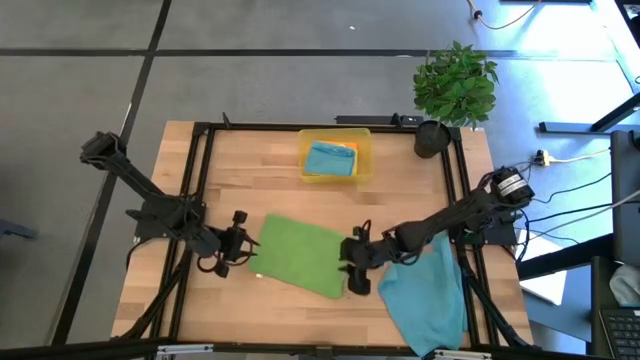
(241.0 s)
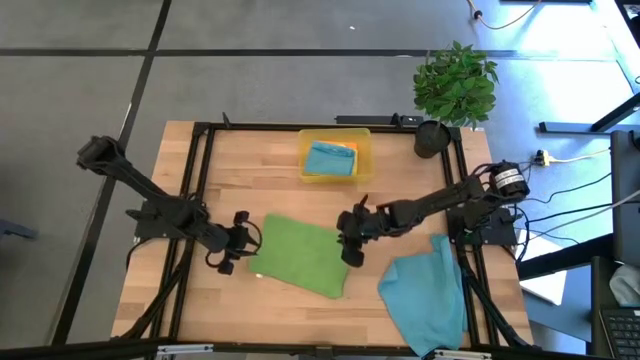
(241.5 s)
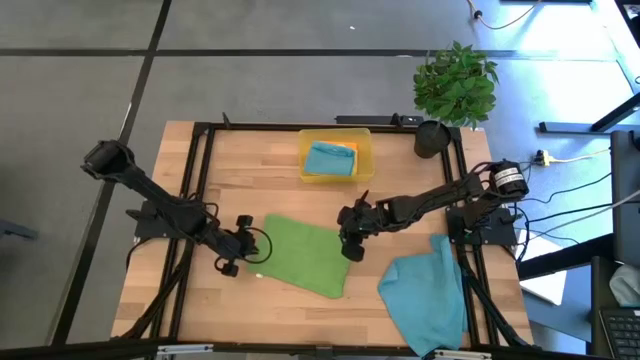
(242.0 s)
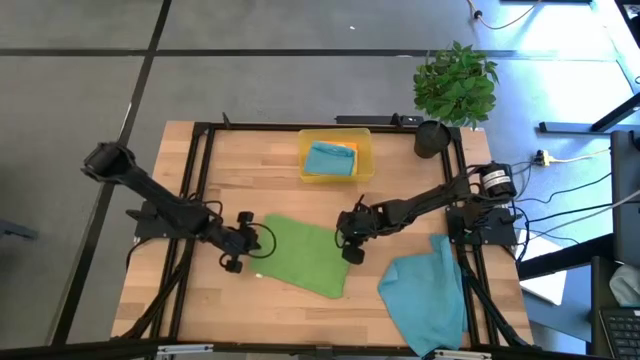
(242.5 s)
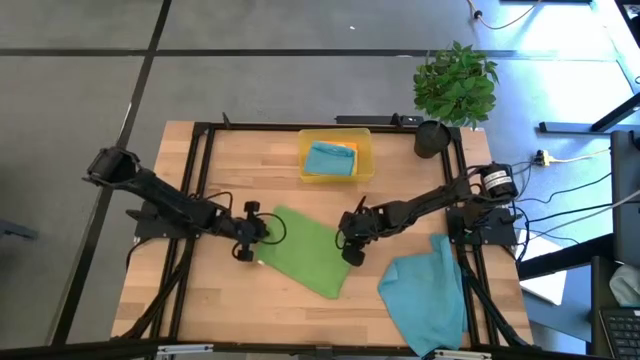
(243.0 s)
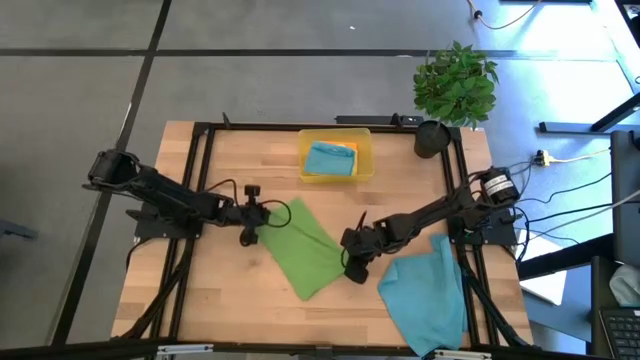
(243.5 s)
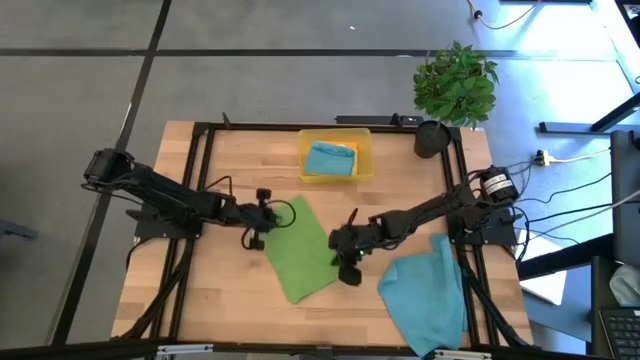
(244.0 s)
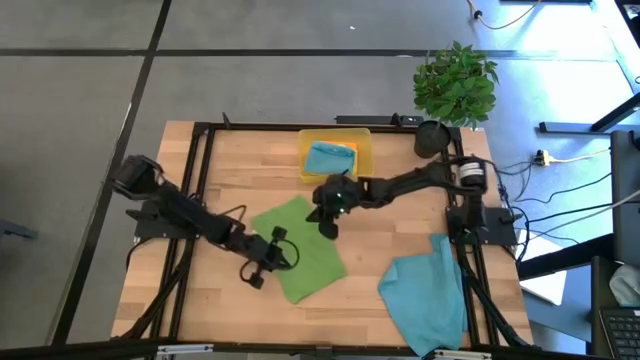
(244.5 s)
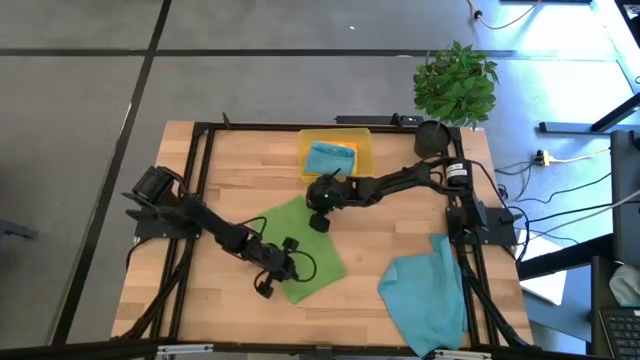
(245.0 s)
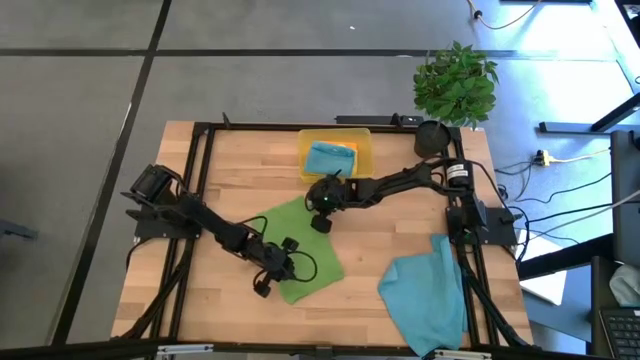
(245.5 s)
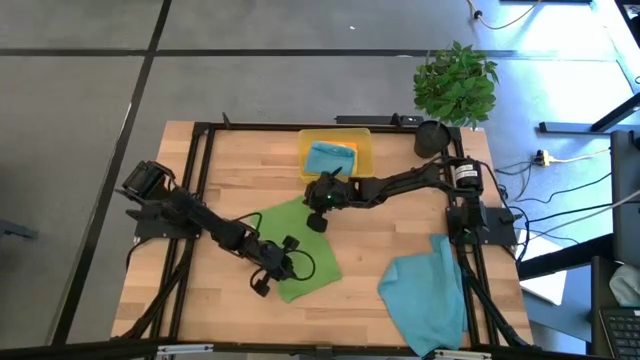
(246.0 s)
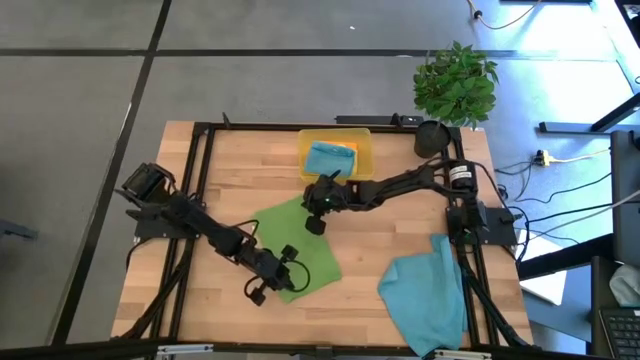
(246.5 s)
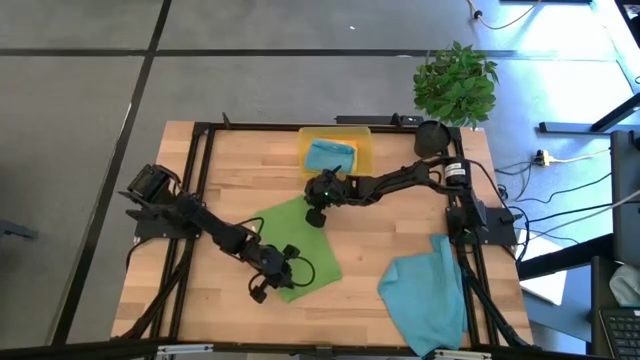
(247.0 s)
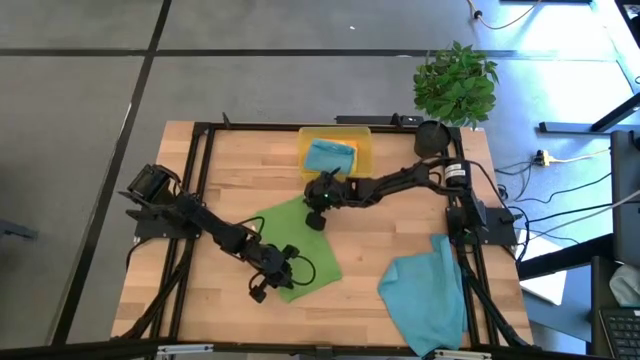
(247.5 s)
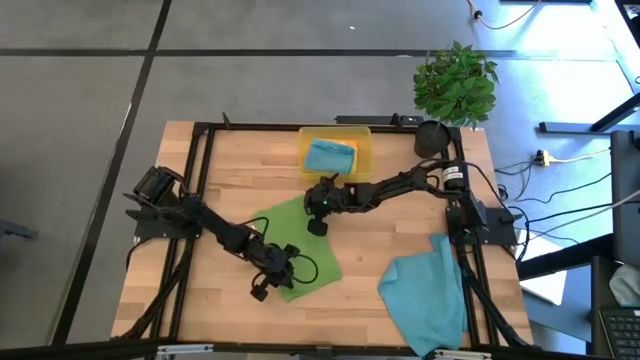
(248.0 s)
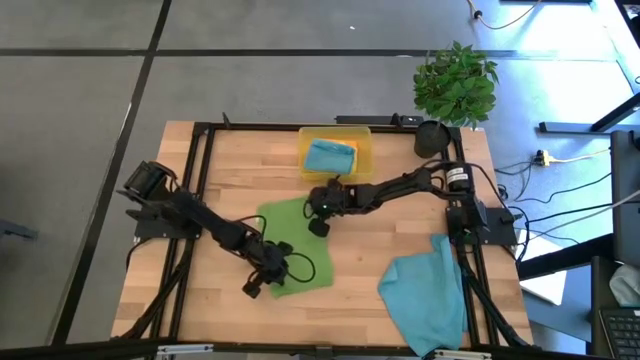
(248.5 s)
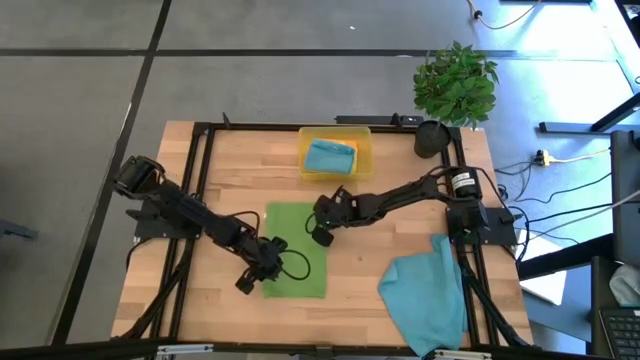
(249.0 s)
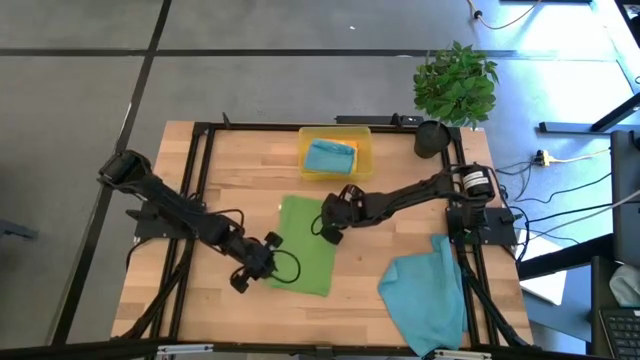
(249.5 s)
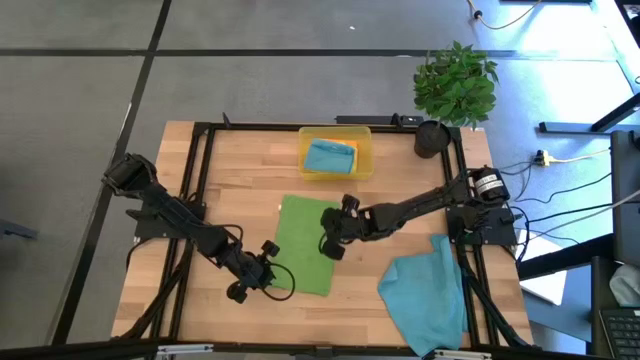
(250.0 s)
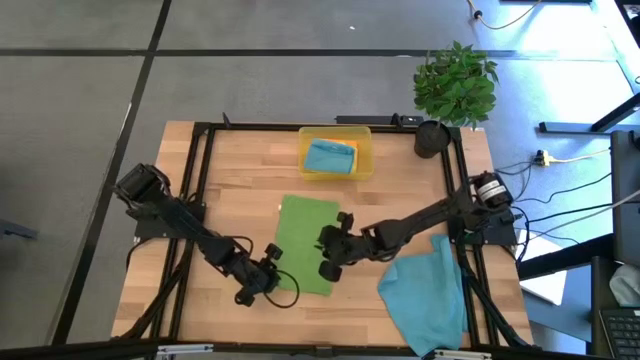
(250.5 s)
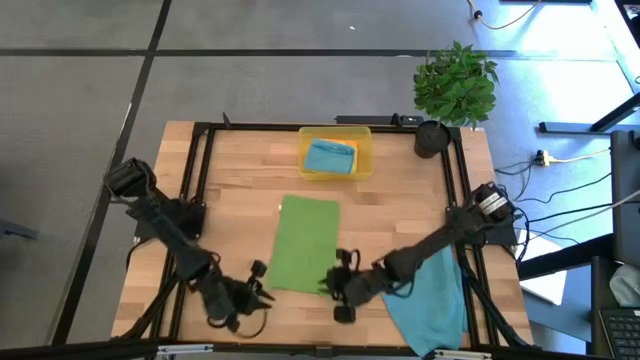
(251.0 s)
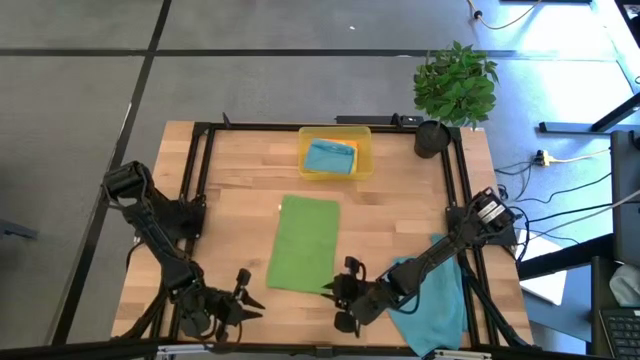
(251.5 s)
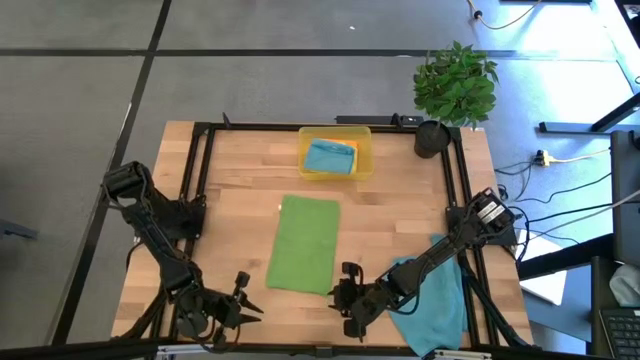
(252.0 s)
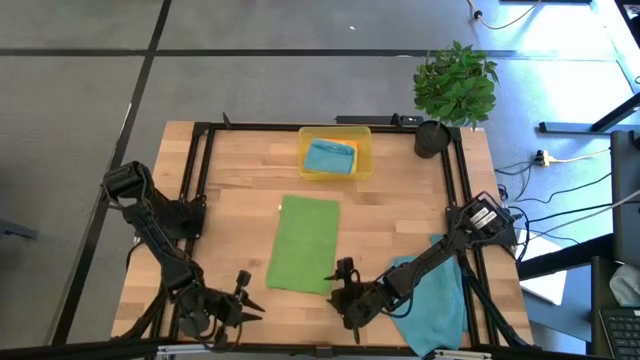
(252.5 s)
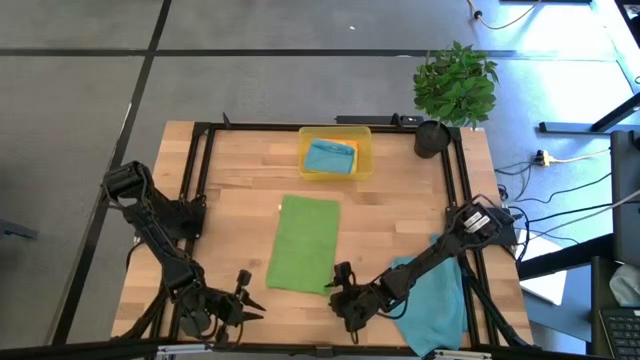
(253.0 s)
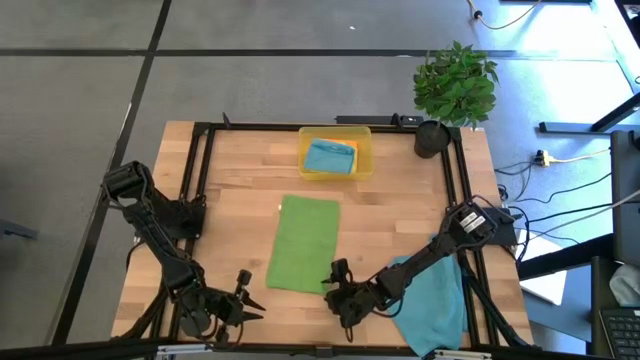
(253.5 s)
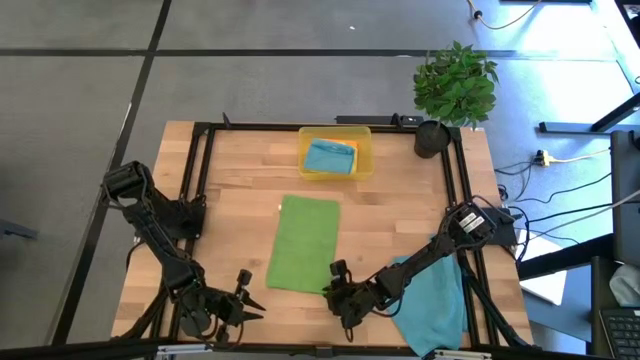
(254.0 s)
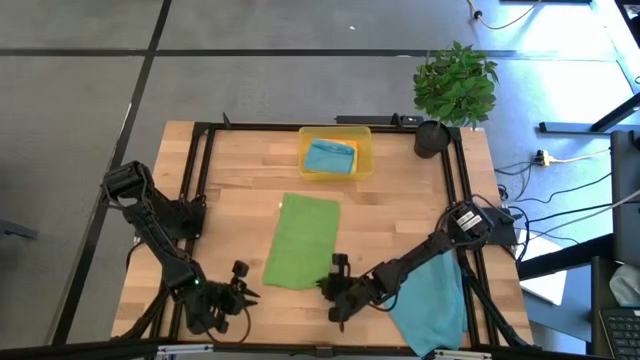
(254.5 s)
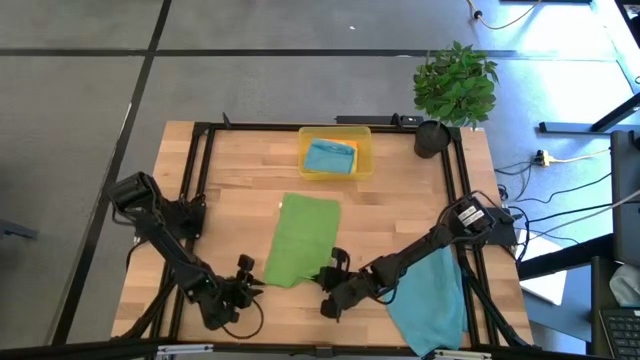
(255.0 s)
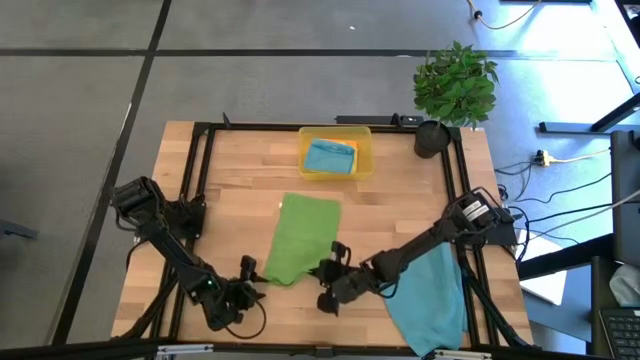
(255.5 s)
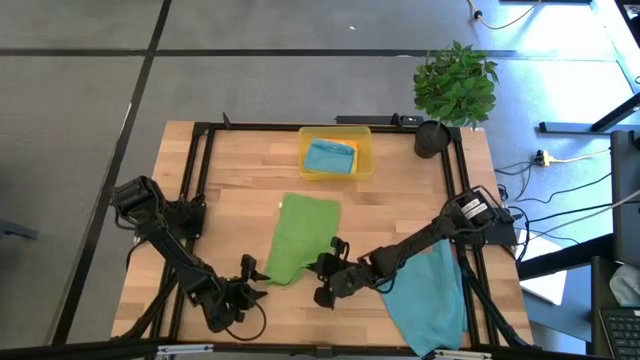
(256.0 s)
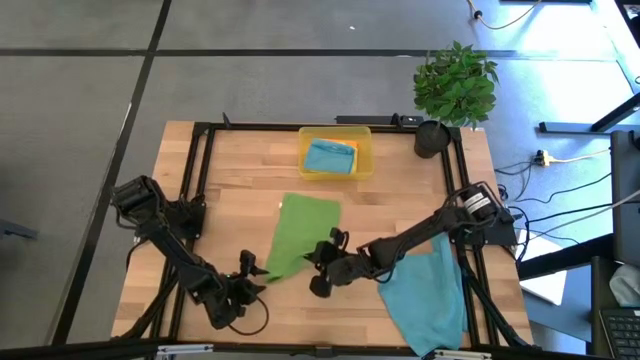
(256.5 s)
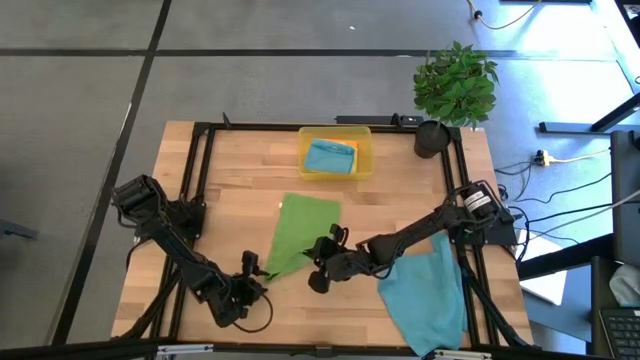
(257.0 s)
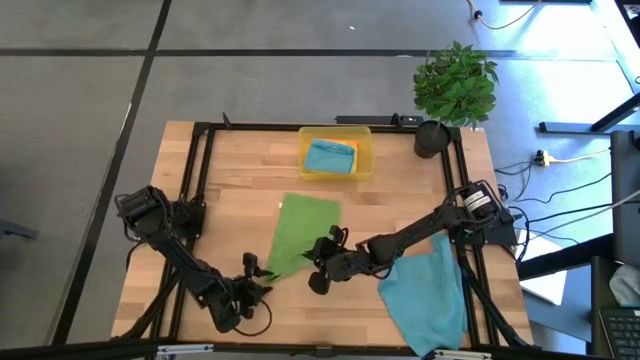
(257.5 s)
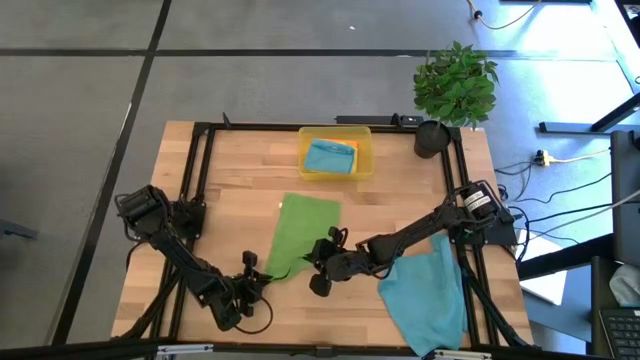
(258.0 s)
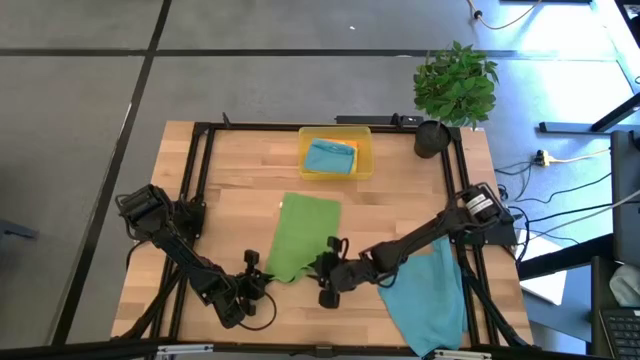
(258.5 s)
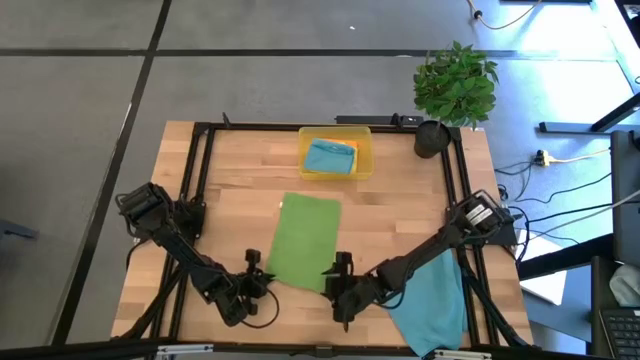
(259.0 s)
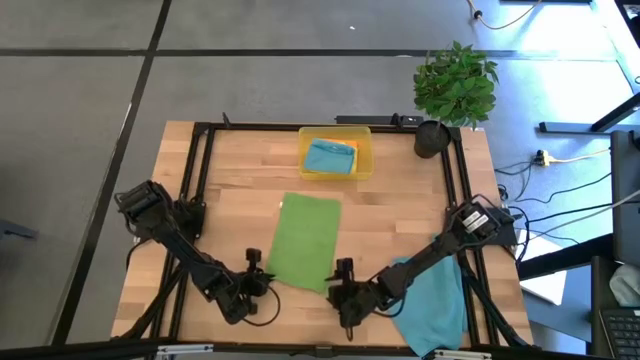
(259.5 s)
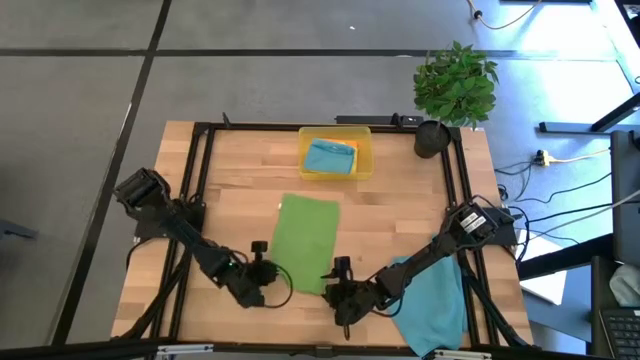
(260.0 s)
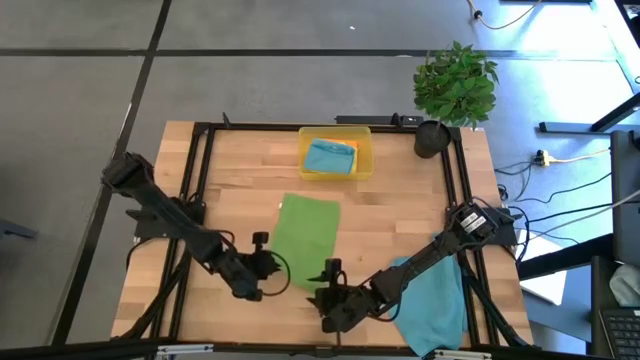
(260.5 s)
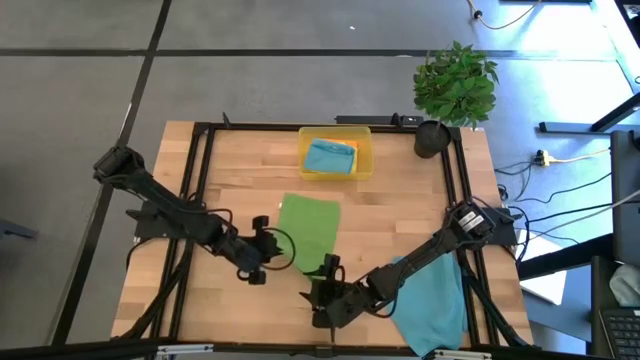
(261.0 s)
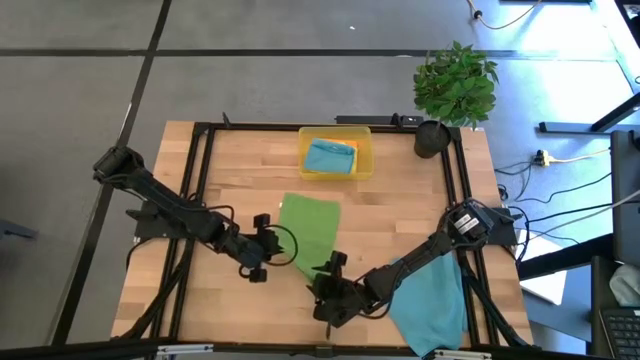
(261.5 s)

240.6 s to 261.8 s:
Task: Fold microfiber towels
Fold the green microfiber cloth

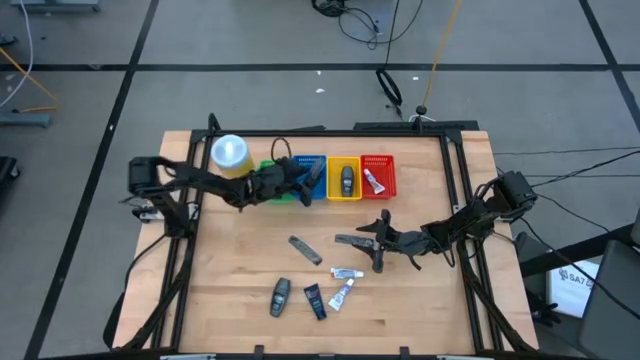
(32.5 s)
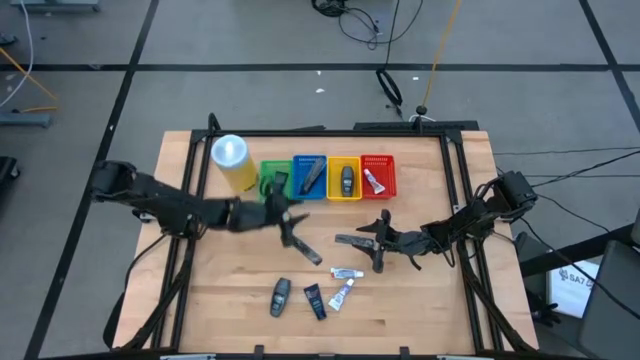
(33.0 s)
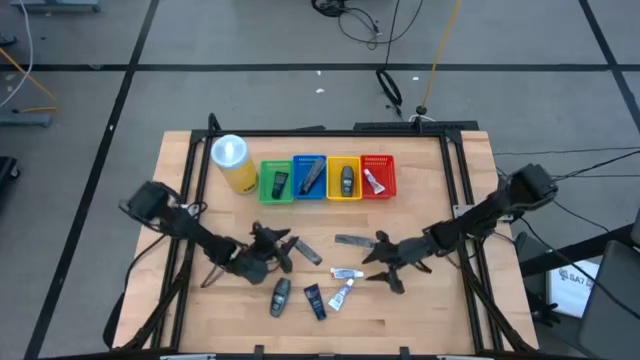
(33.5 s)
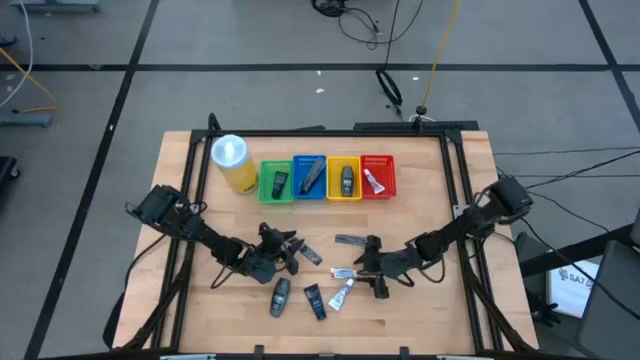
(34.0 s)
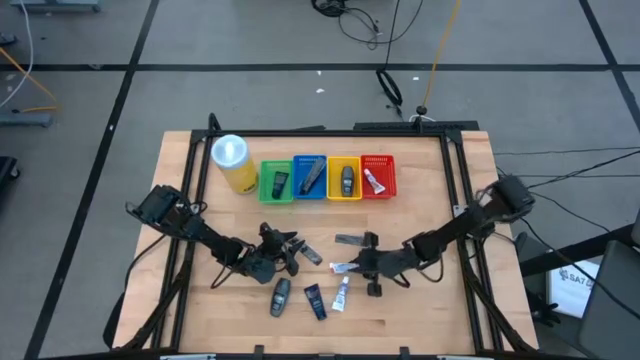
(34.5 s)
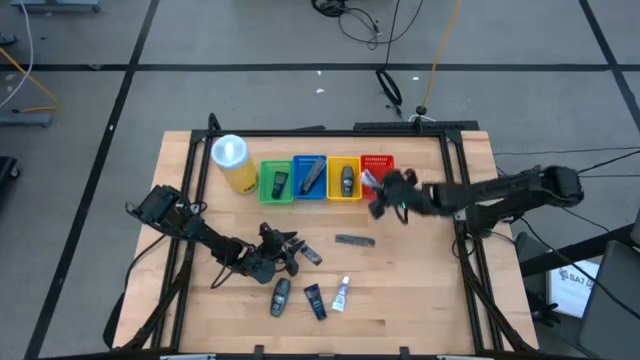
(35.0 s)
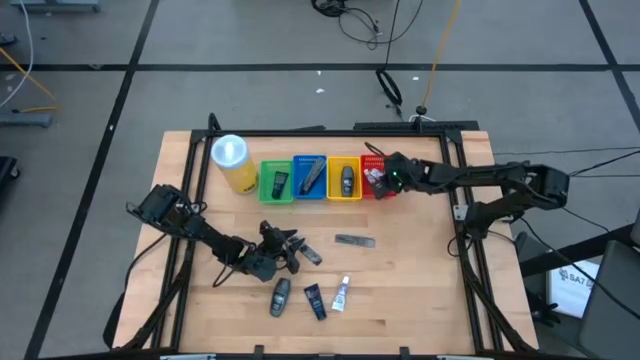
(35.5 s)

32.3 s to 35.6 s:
Task: Pick & Place Travel size toiletries
Put the toothpaste into the red basket
